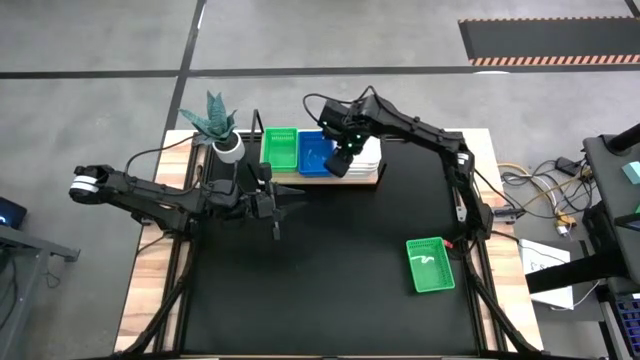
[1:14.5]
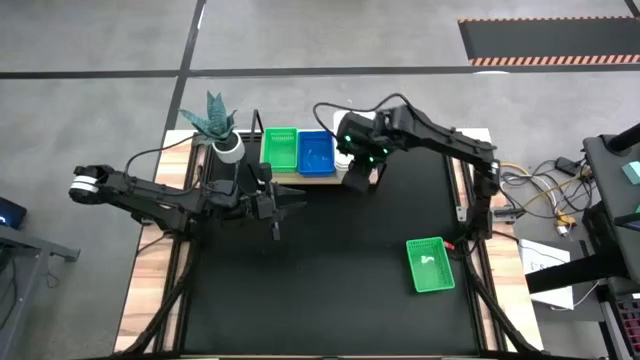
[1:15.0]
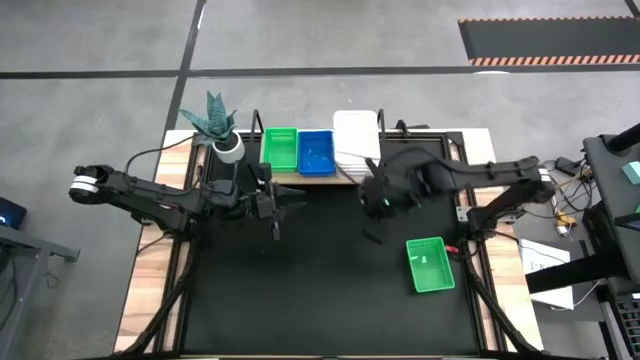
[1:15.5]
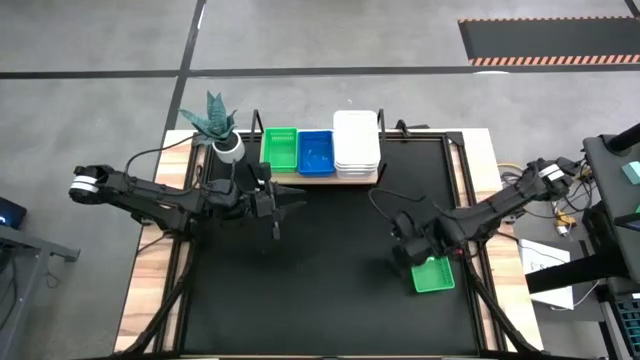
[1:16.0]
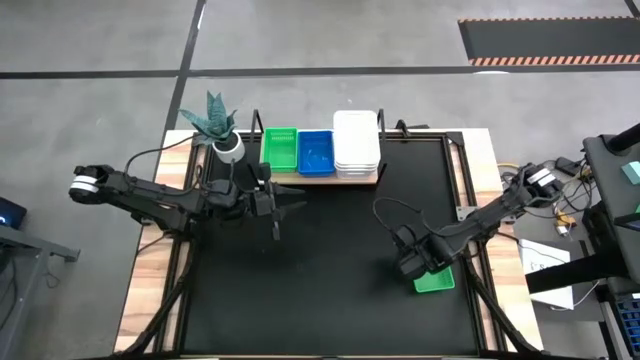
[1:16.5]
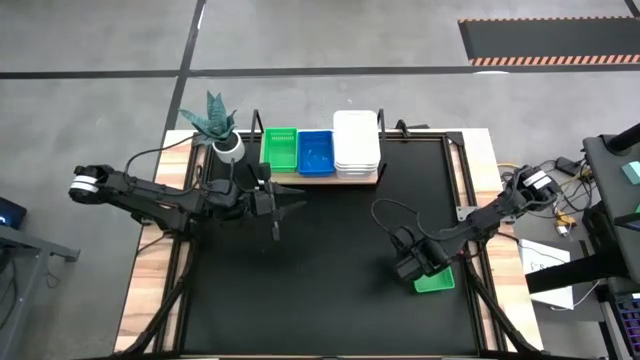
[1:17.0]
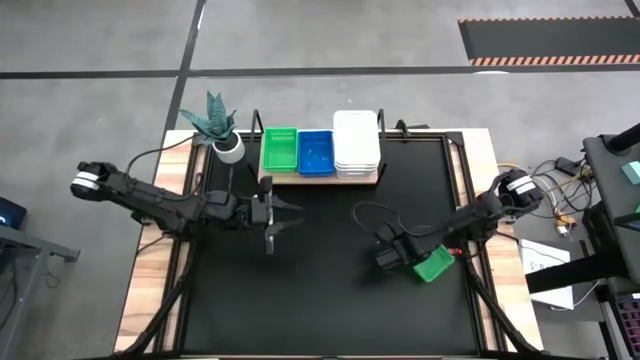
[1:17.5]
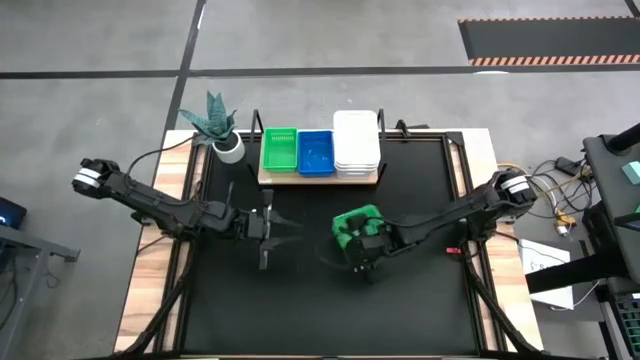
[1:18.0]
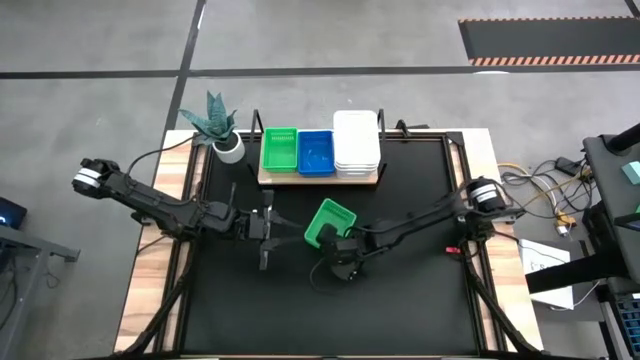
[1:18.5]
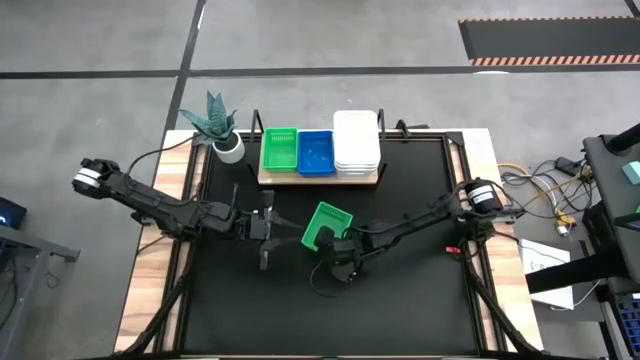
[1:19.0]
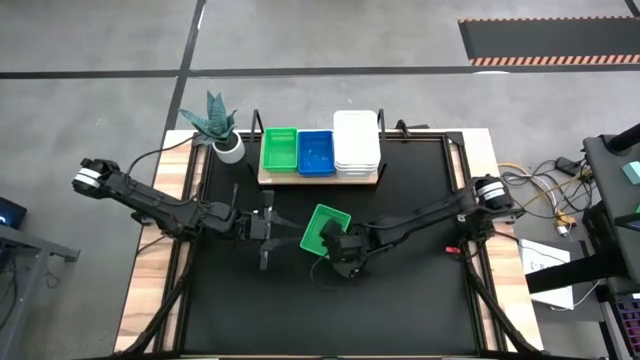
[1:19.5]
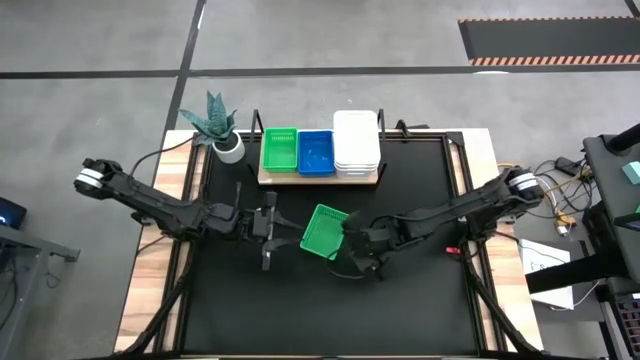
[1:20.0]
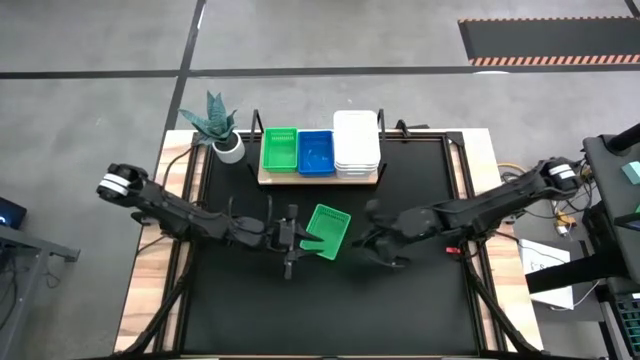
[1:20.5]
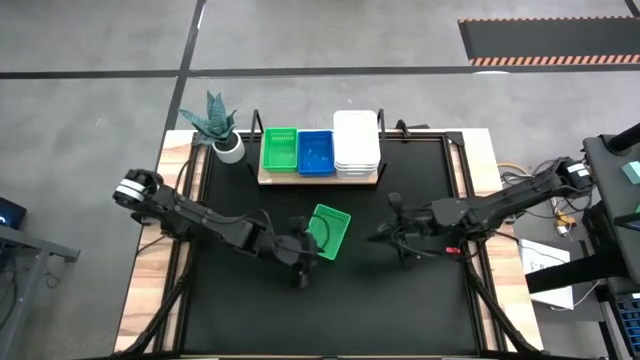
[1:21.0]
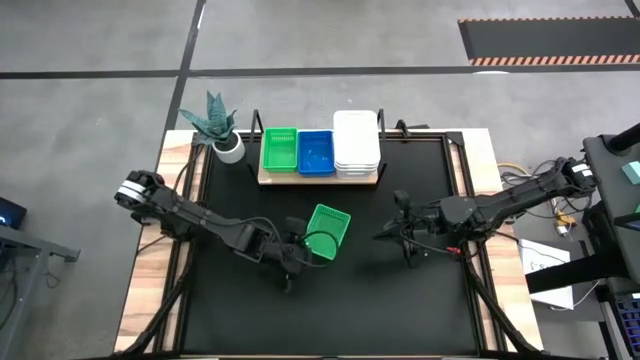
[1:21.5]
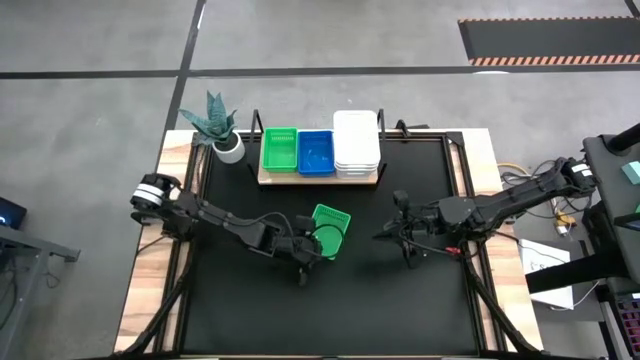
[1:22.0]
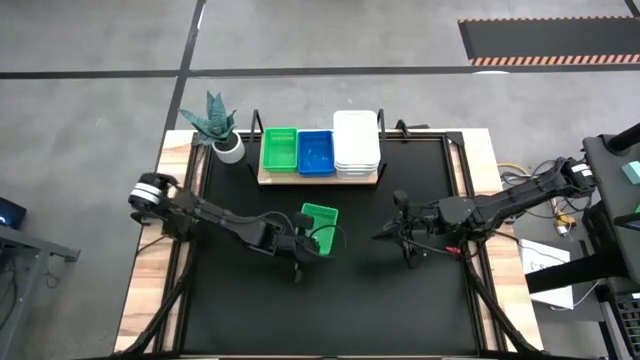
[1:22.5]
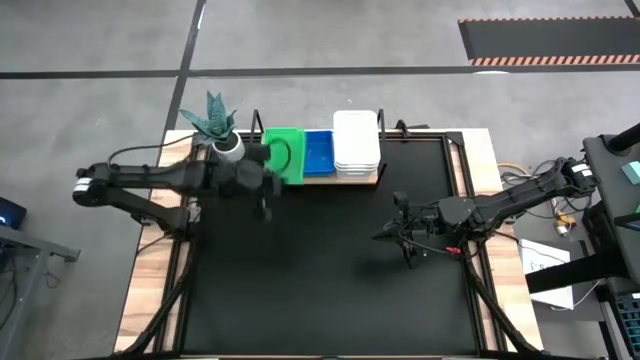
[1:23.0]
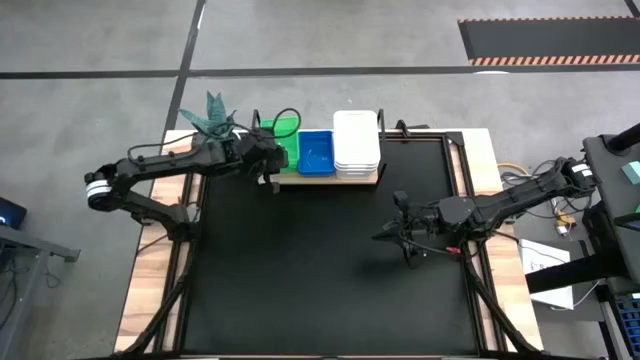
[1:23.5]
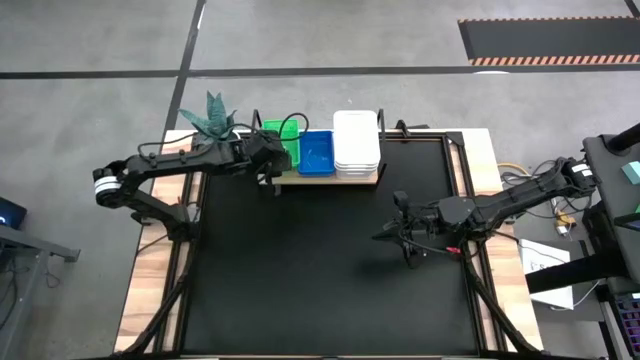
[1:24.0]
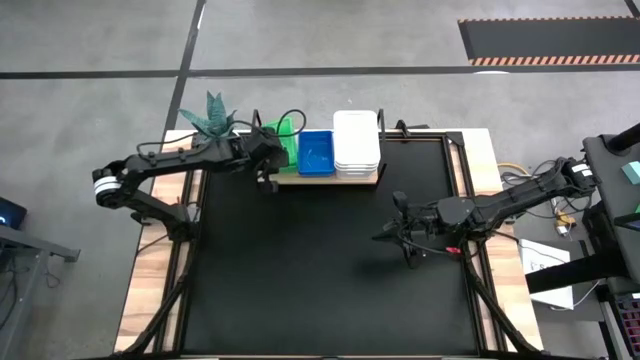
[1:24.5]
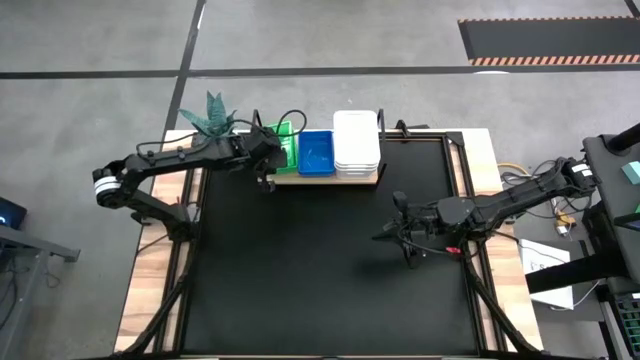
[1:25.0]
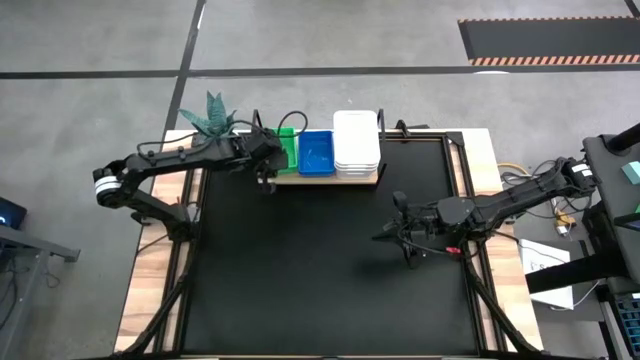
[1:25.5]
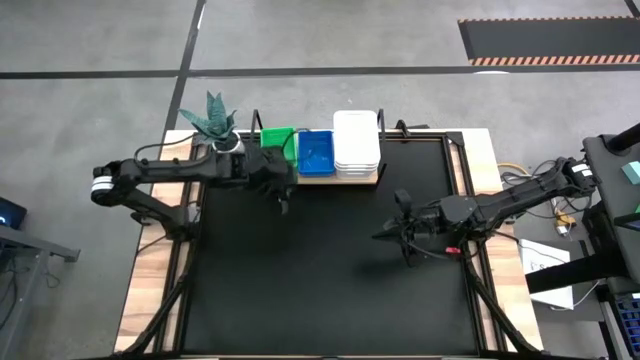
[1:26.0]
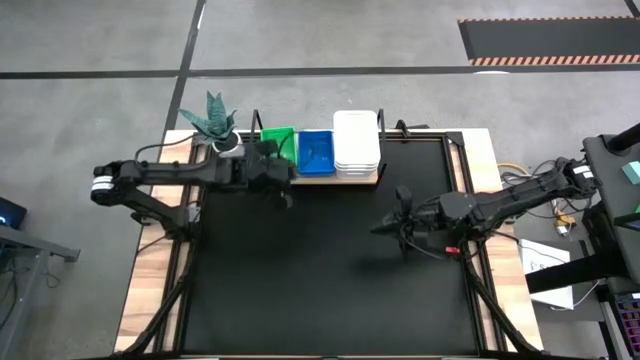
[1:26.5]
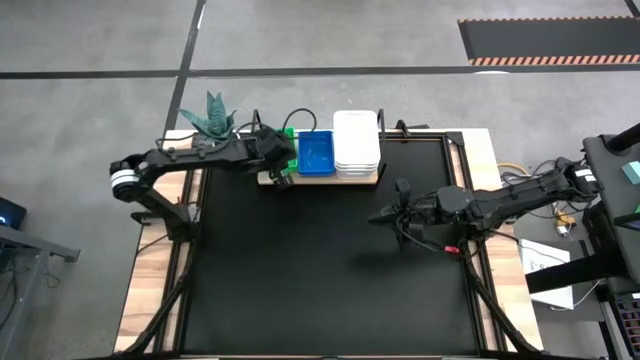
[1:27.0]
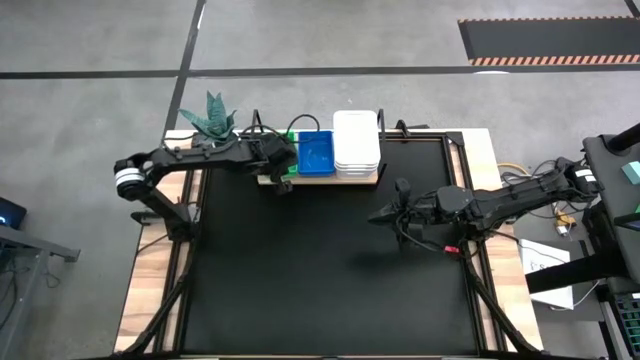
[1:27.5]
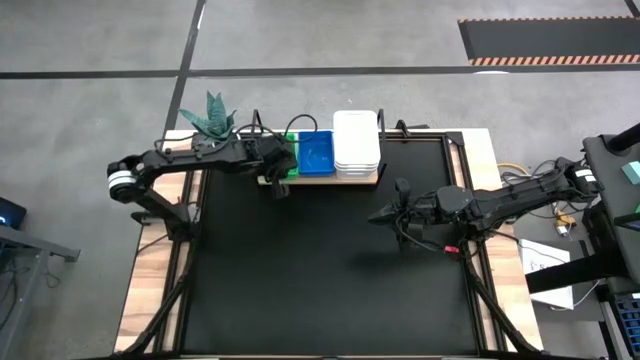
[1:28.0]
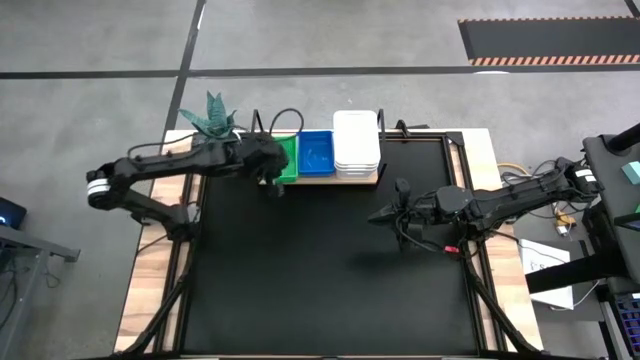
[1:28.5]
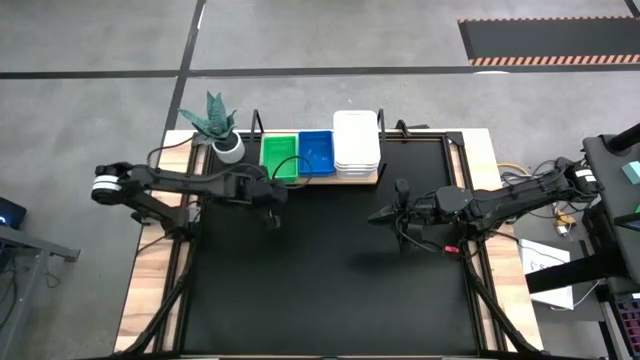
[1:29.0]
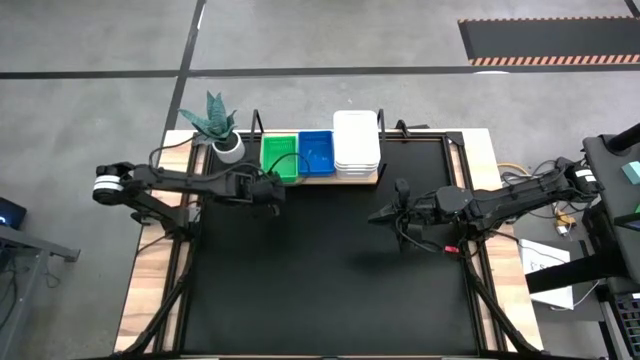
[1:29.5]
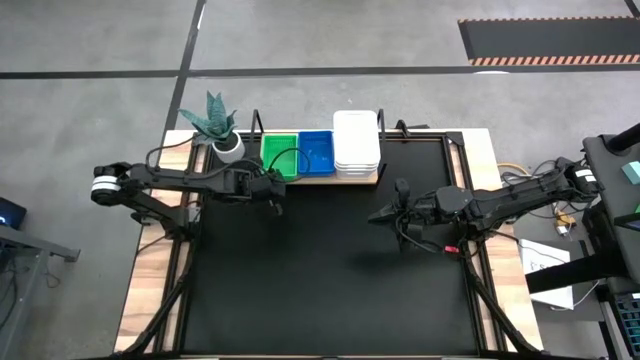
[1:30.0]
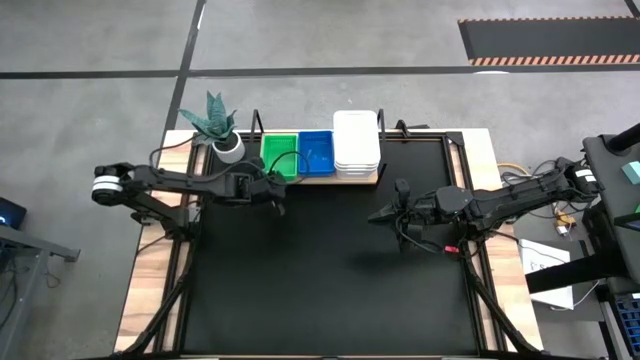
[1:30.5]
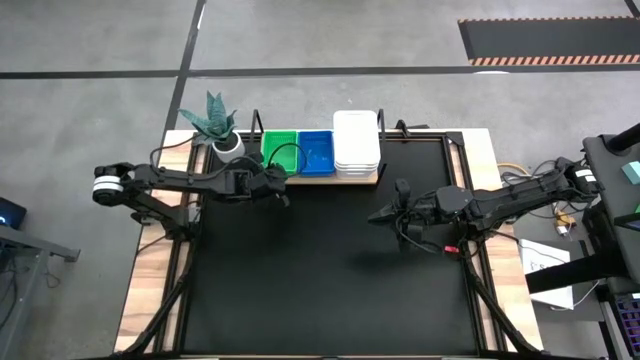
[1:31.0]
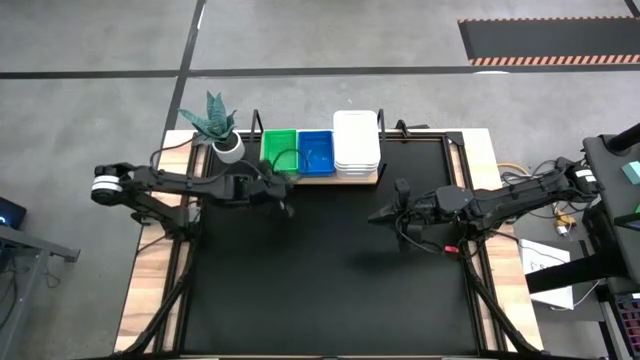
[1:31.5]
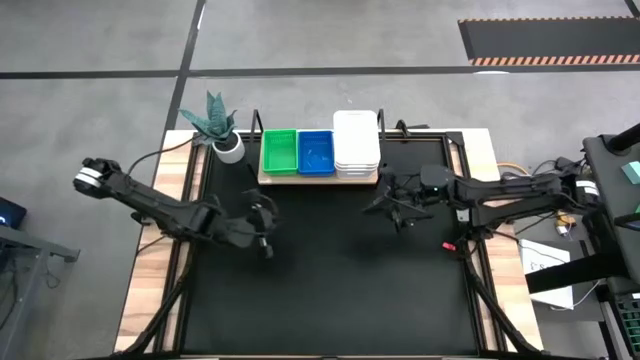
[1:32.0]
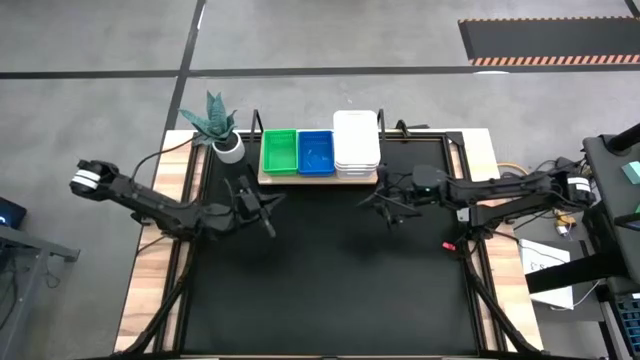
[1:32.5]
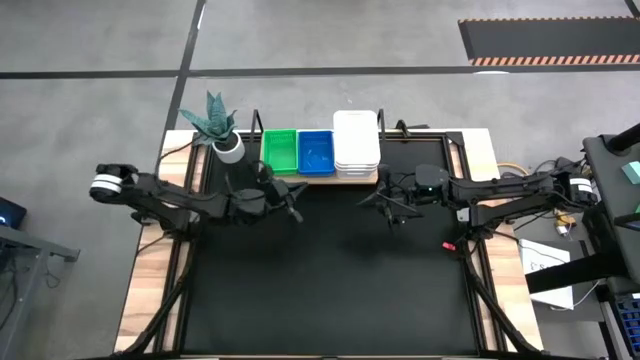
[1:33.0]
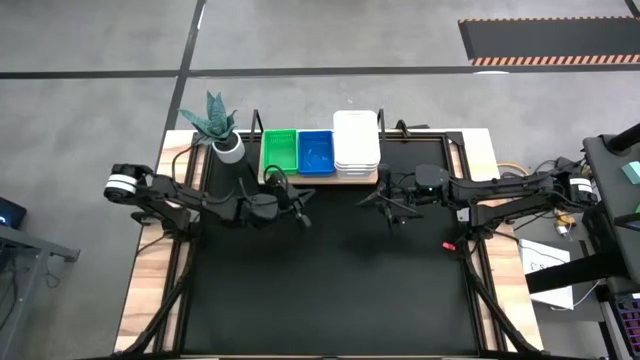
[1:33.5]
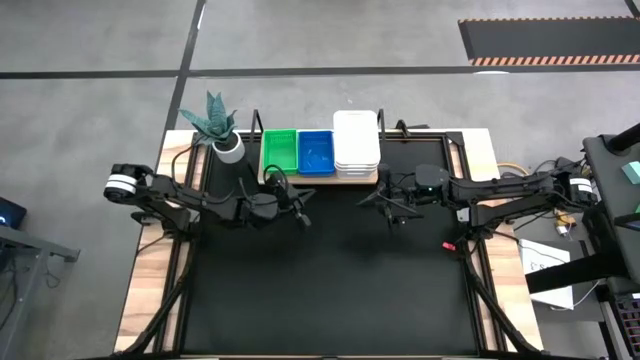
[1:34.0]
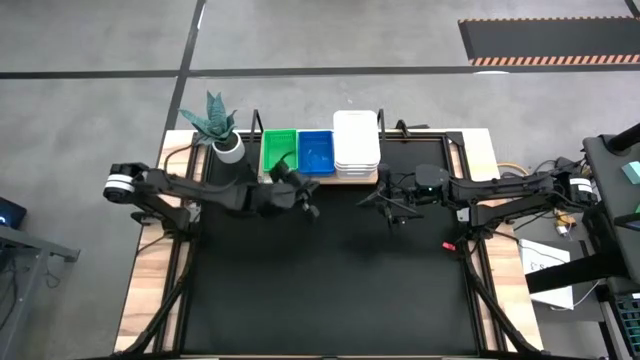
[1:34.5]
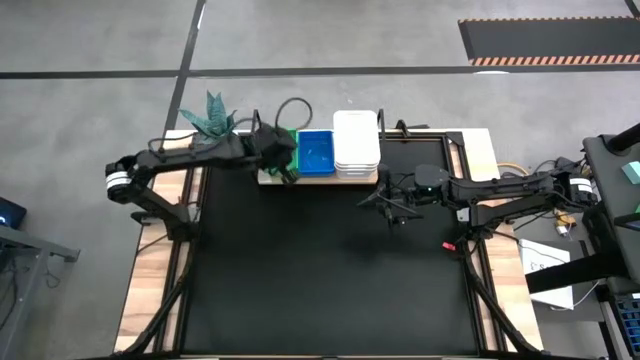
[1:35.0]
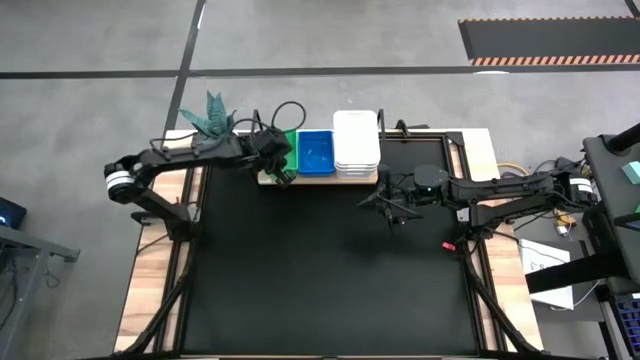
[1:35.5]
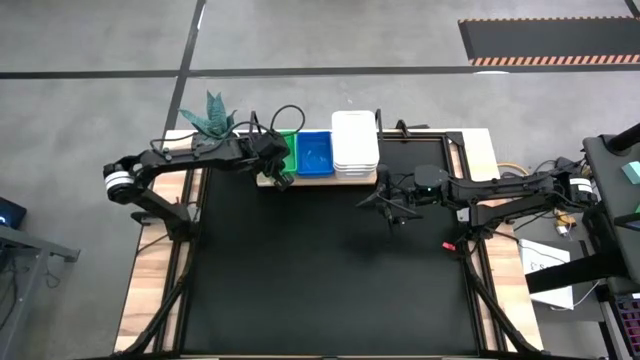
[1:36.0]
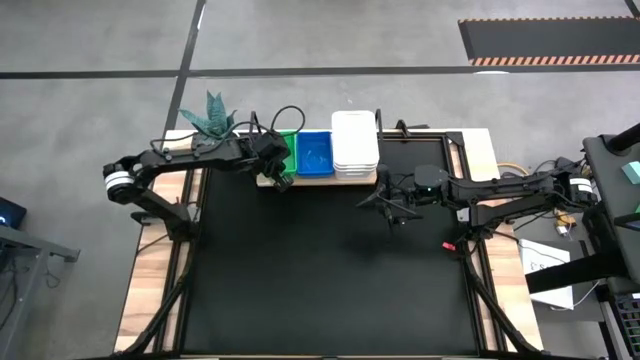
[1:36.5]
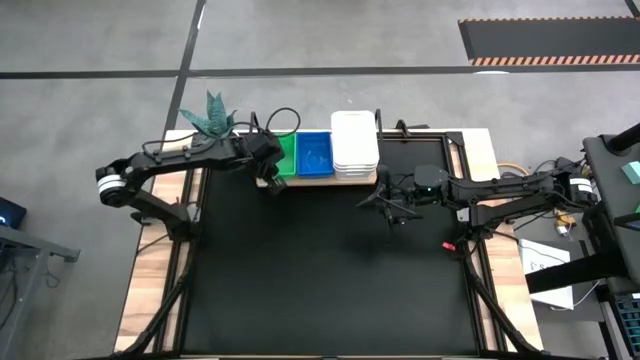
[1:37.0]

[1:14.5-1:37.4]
Task: Stack baskets on shelf by color
Stack the green bin on top of the stacked green bins on the shelf
